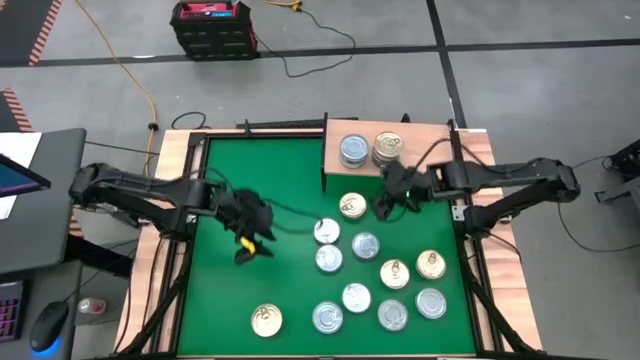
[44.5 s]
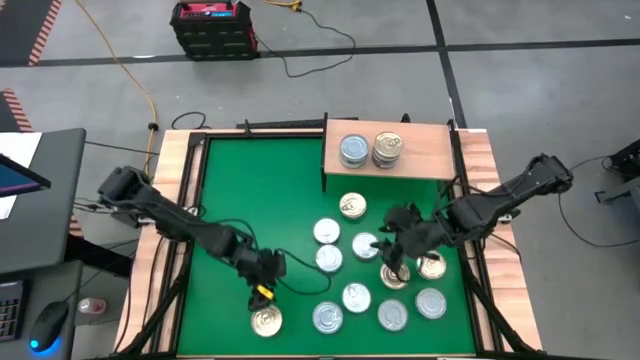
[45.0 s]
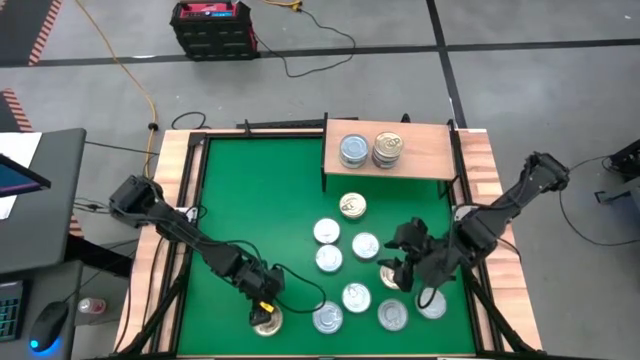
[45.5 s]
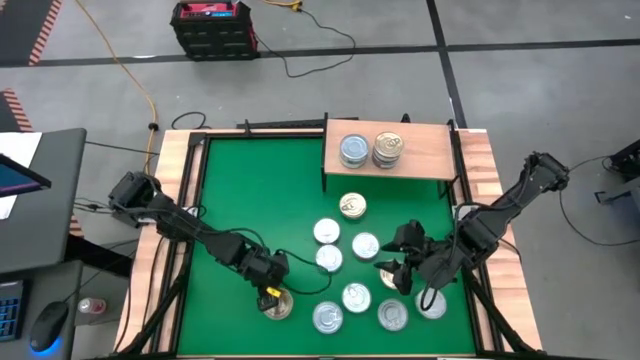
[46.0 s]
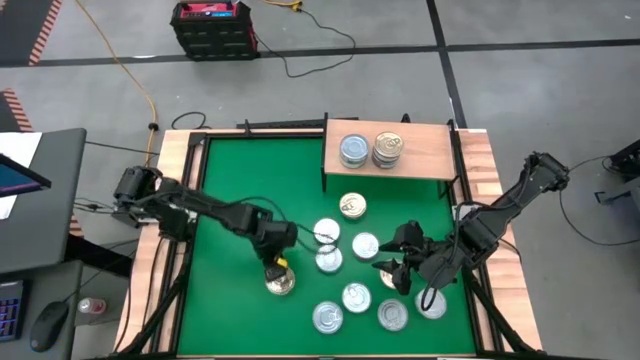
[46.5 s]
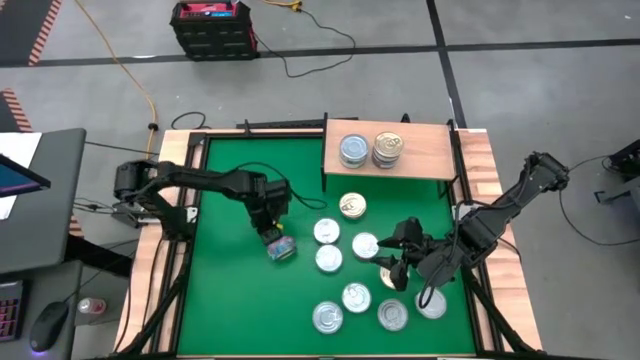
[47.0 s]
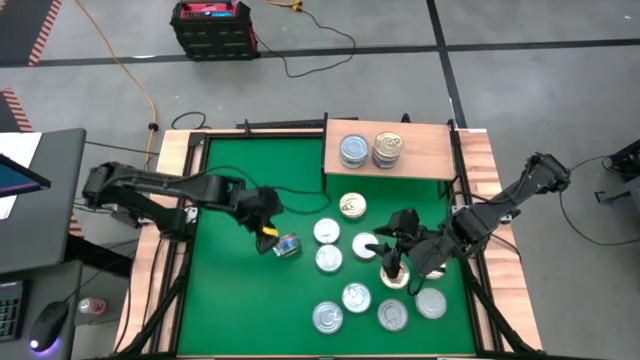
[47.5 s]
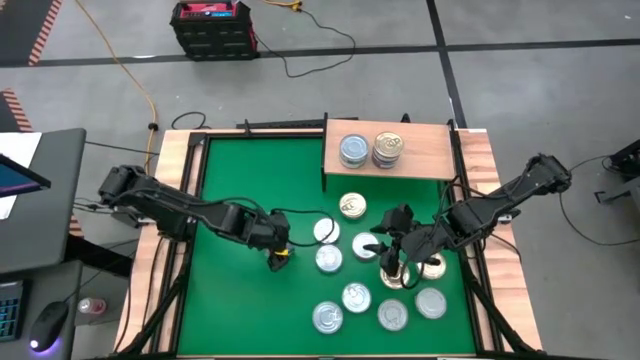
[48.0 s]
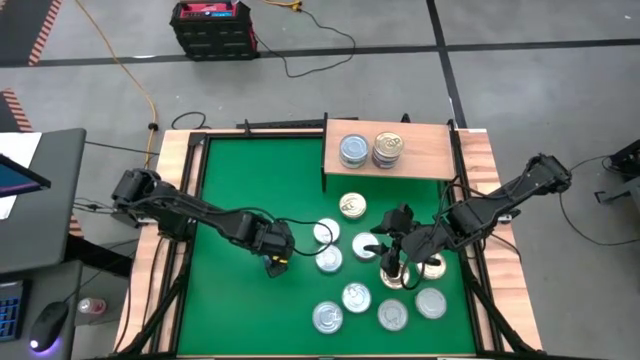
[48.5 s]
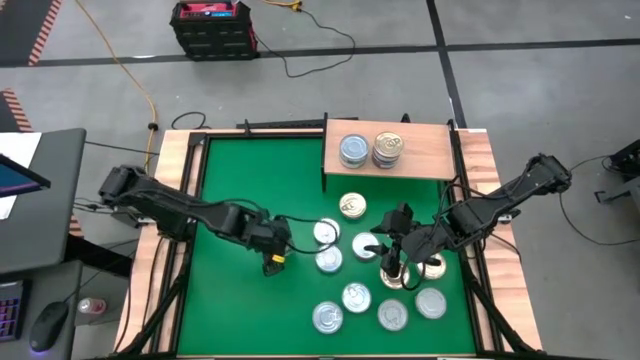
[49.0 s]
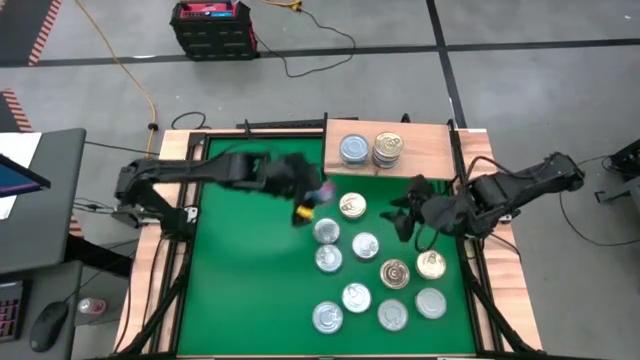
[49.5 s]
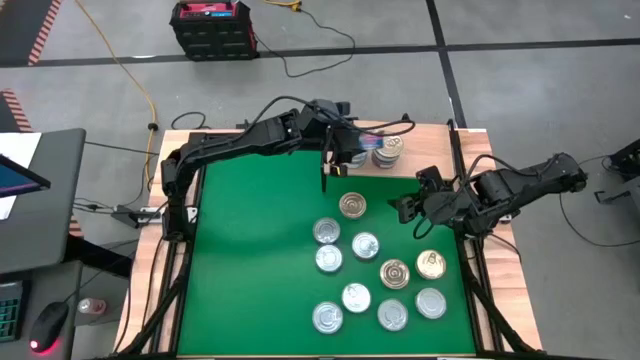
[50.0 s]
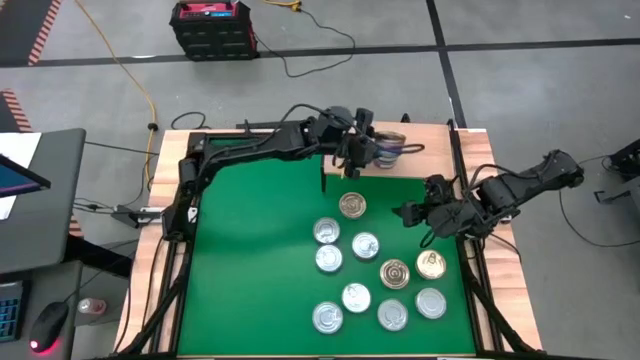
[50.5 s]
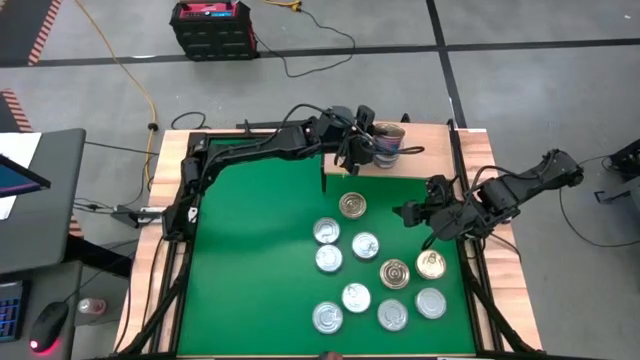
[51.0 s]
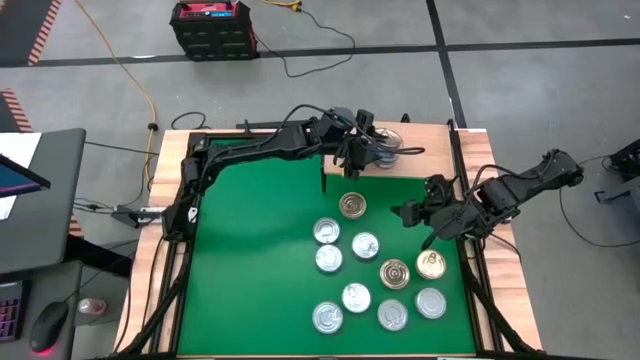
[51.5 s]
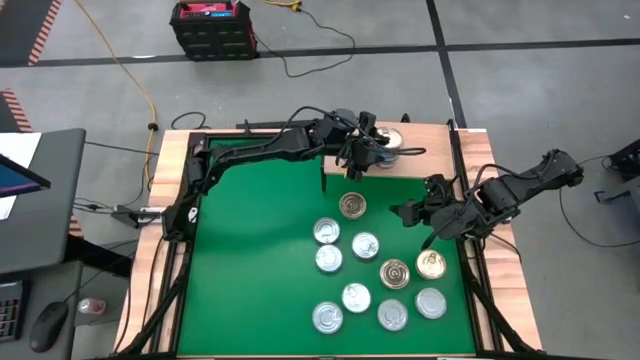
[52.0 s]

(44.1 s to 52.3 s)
Task: Stack canned seafood by type on shelf
Stack the pink tuna can on top of the pink tuna can

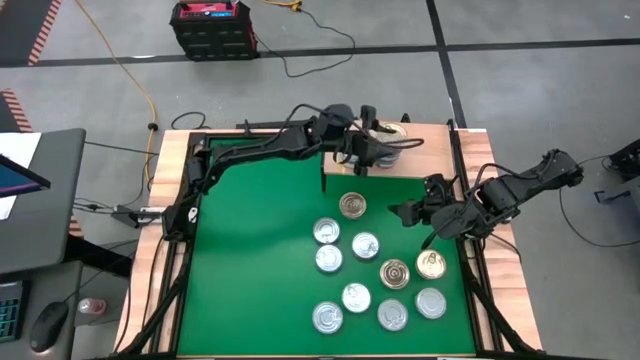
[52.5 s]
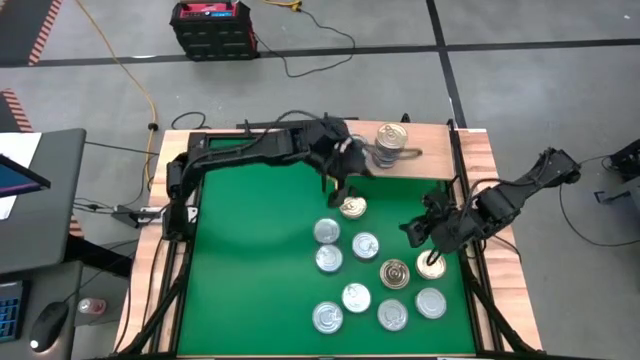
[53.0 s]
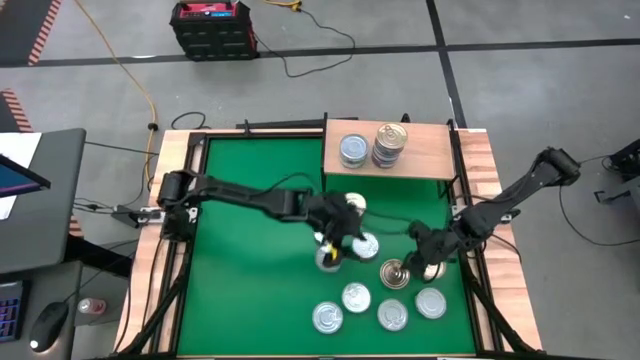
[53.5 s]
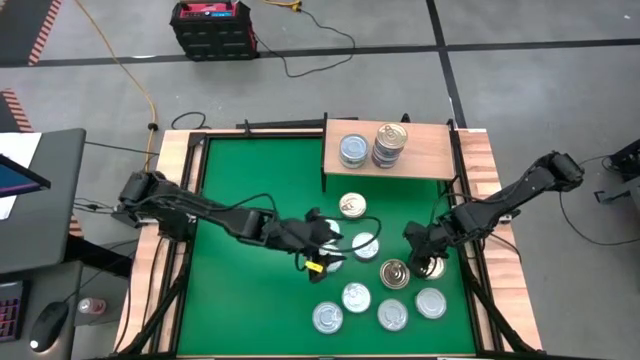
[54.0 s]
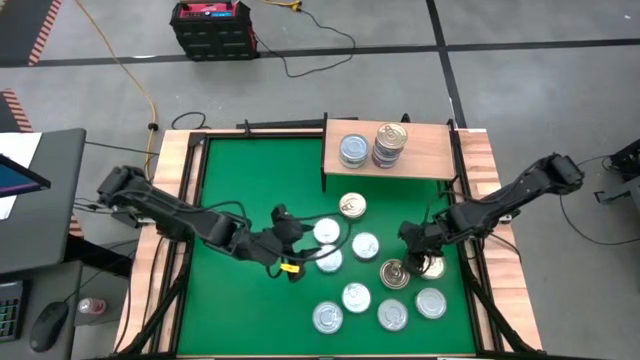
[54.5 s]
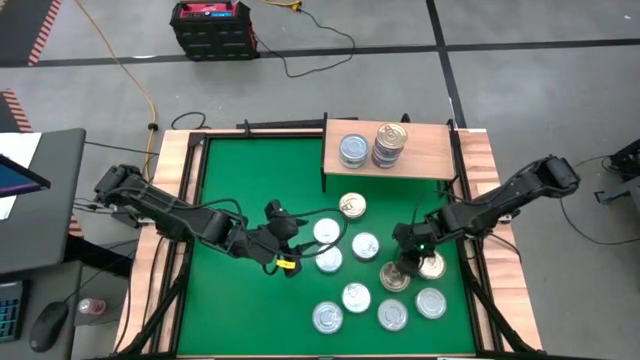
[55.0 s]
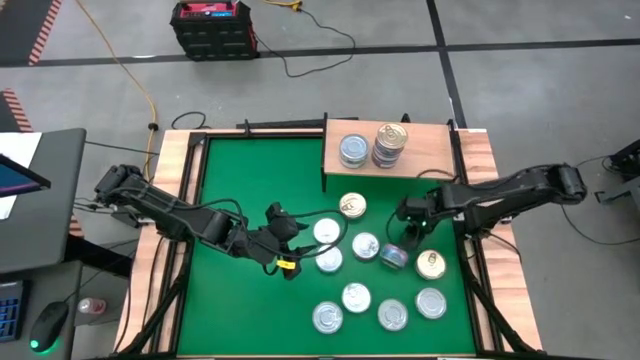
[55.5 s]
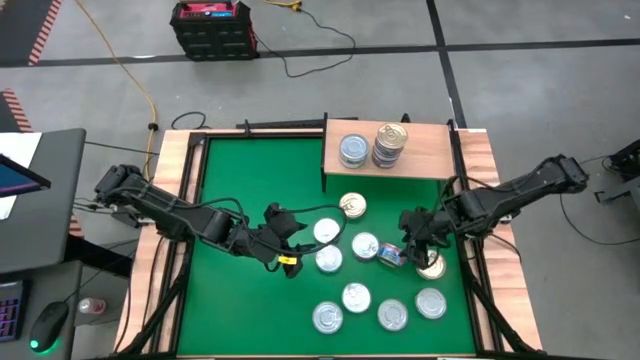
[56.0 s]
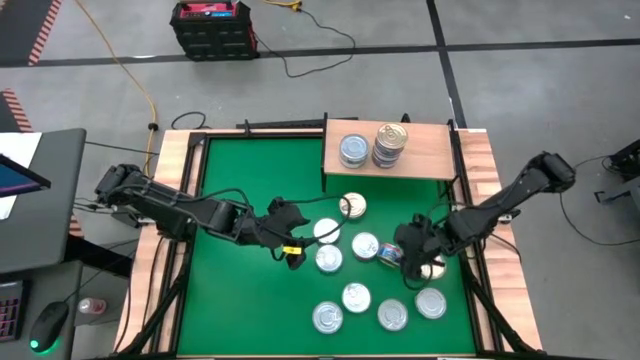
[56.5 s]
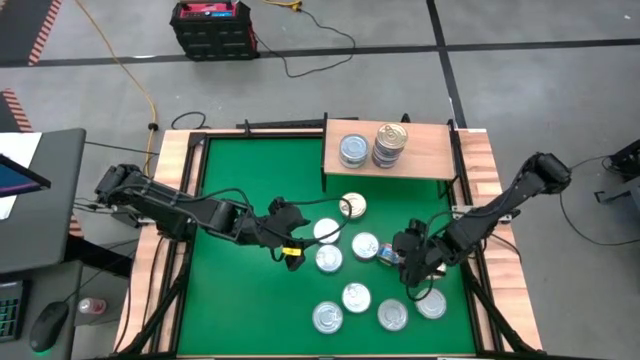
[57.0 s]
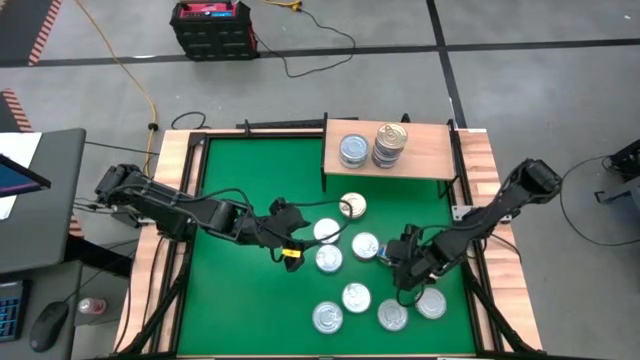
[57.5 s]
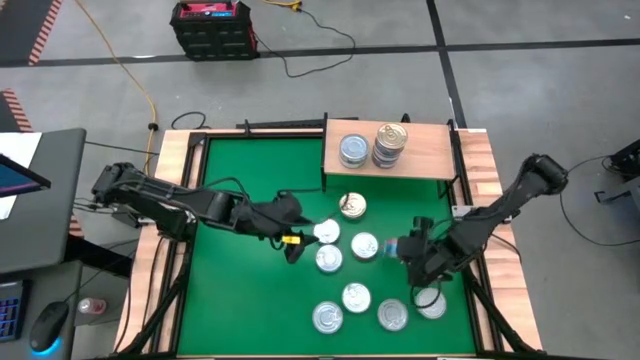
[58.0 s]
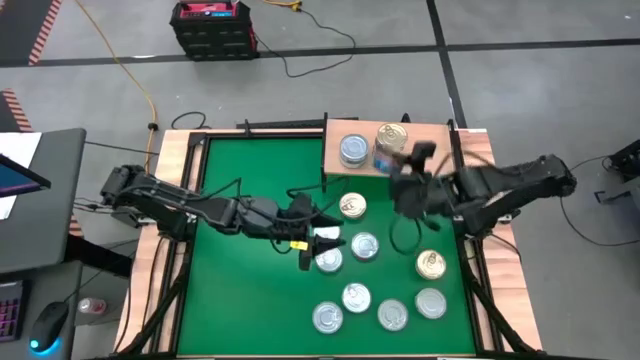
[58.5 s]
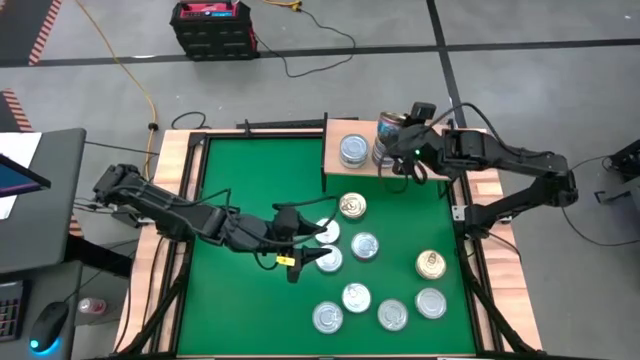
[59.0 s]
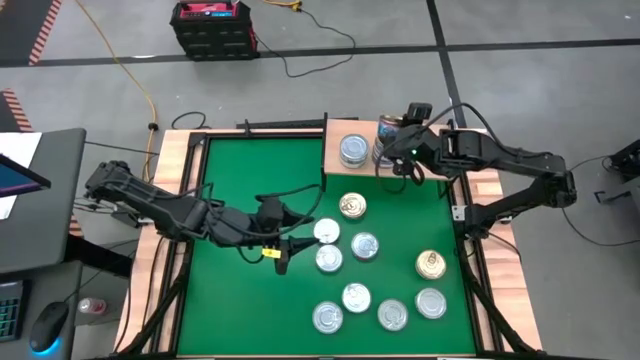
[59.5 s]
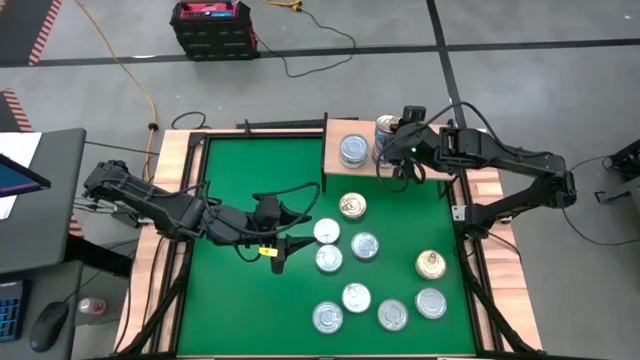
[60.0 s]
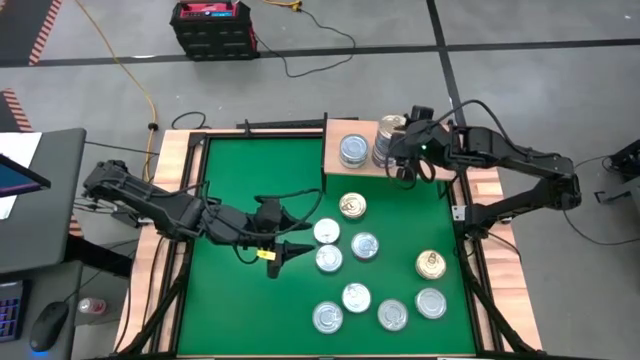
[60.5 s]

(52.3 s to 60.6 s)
Stack the pink tuna can on top of the pink tuna can

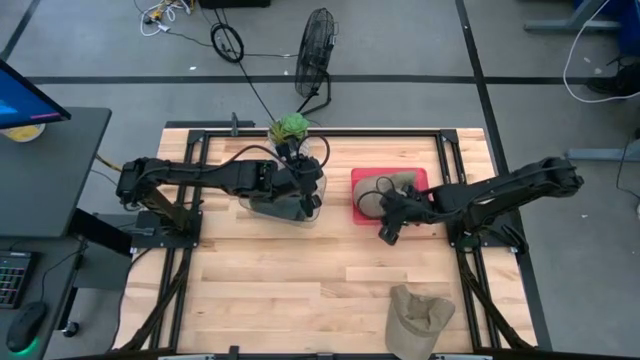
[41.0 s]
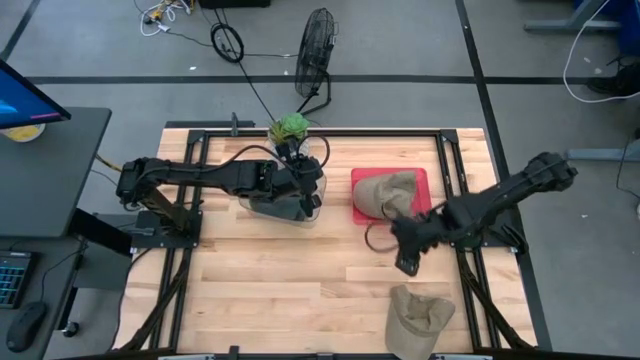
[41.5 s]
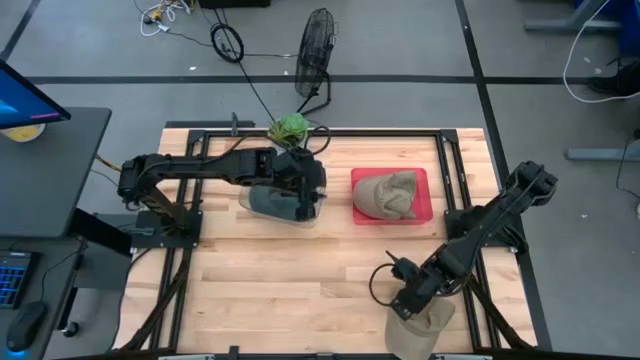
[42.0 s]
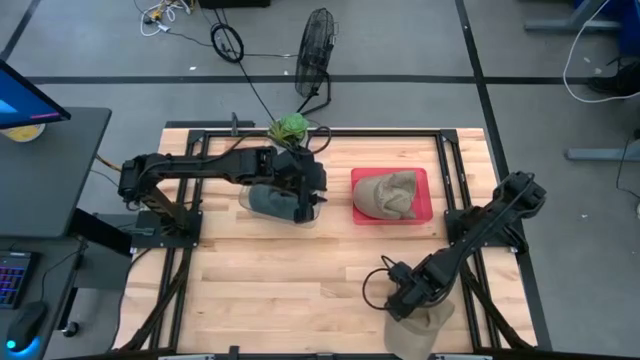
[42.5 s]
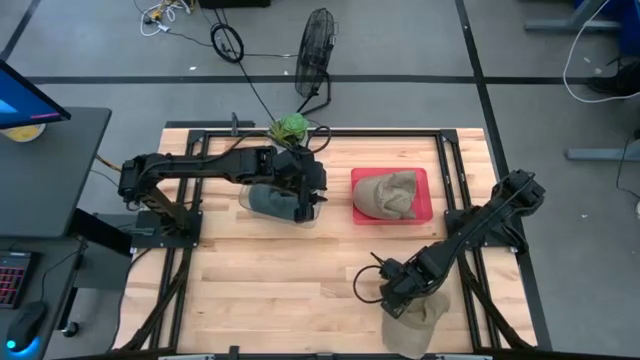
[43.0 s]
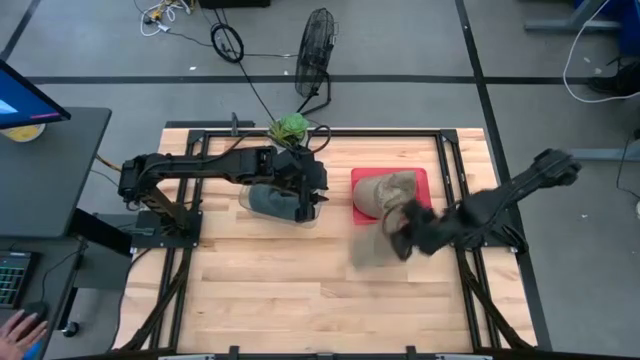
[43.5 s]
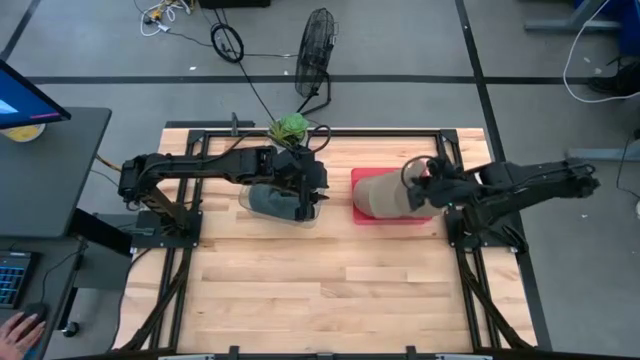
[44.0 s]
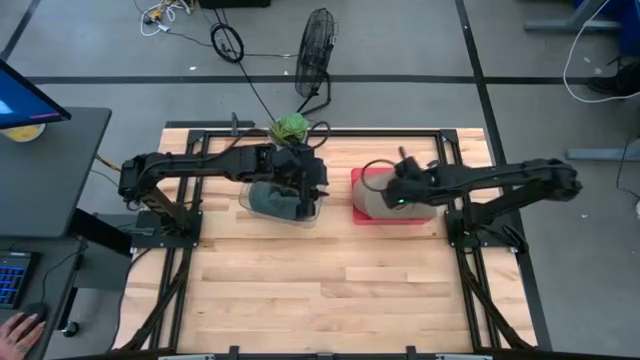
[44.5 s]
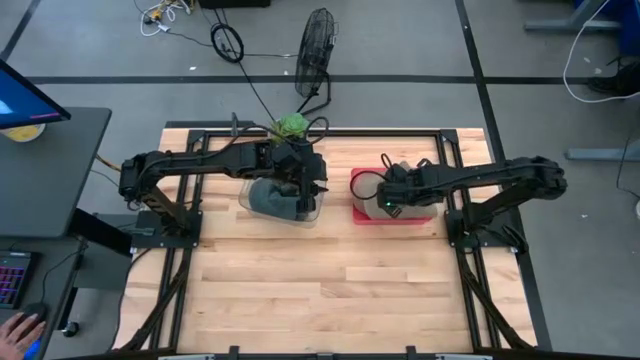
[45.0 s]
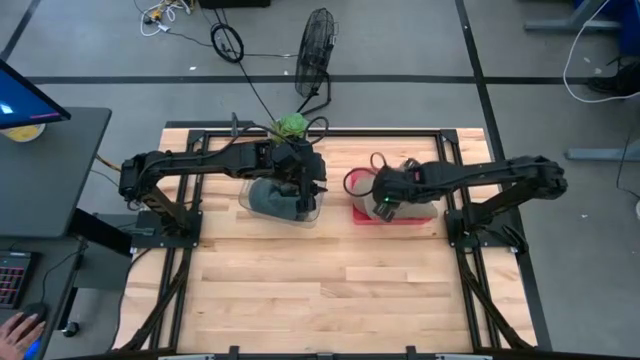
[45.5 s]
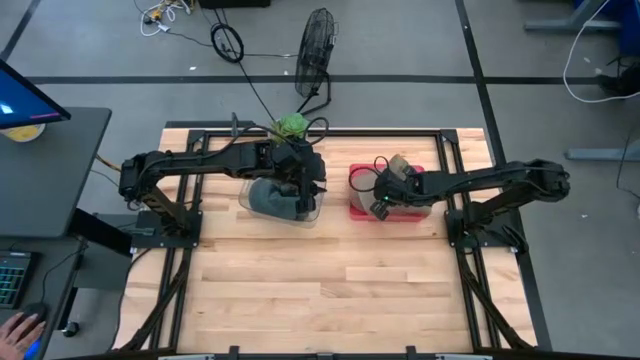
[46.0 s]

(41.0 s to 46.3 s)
Task: Pick & Place hat
Put the brown cap into the red bin
